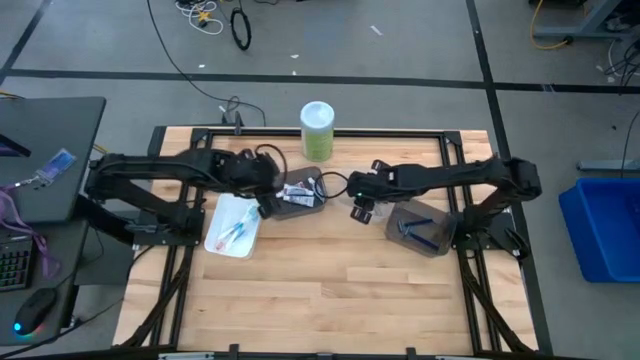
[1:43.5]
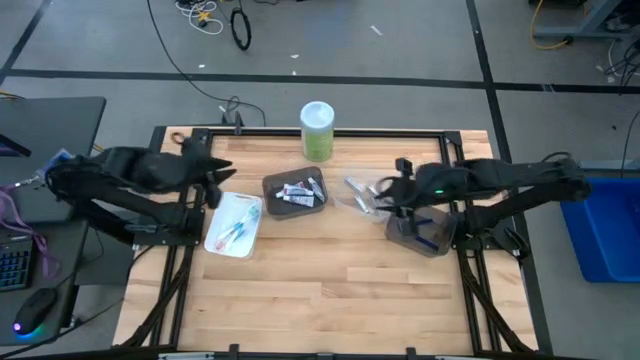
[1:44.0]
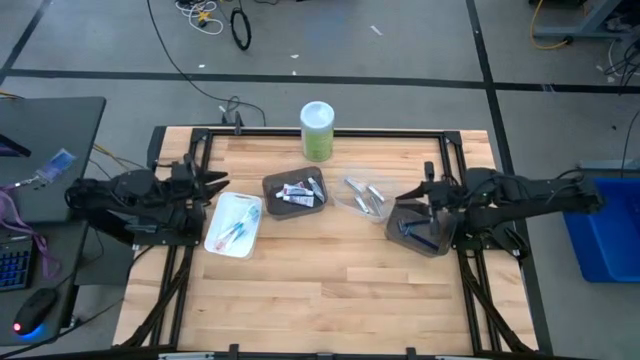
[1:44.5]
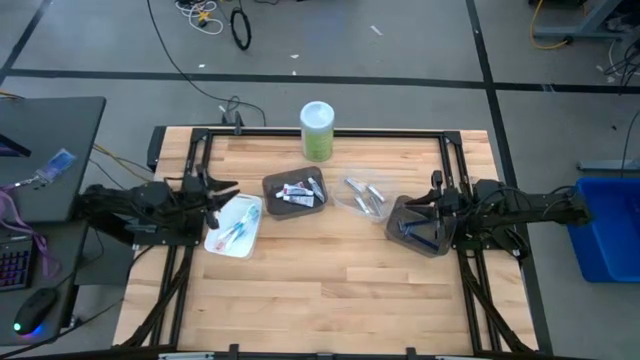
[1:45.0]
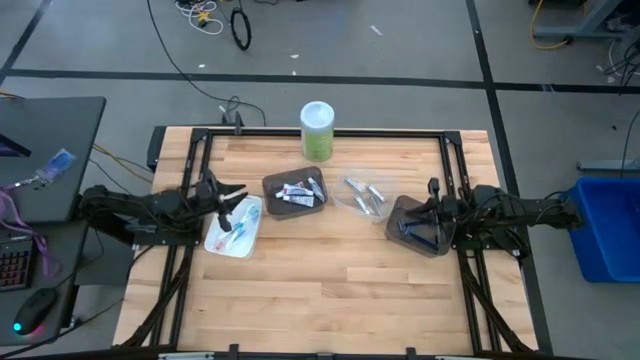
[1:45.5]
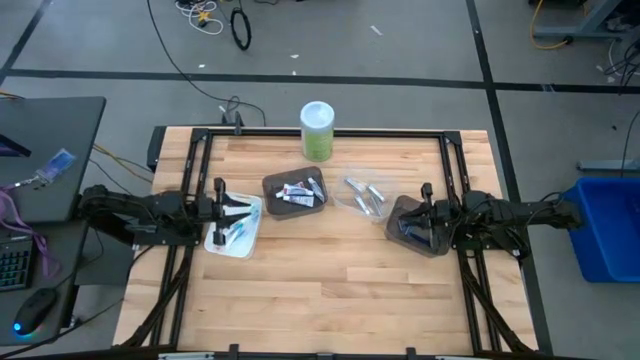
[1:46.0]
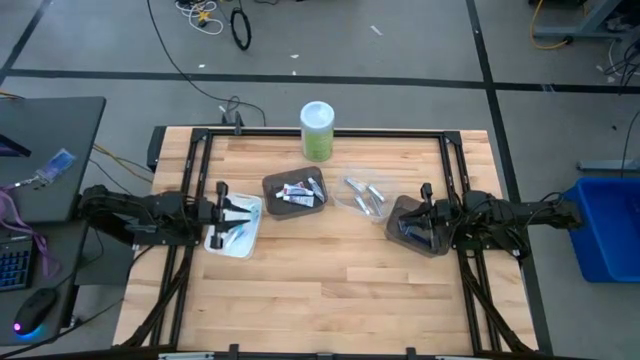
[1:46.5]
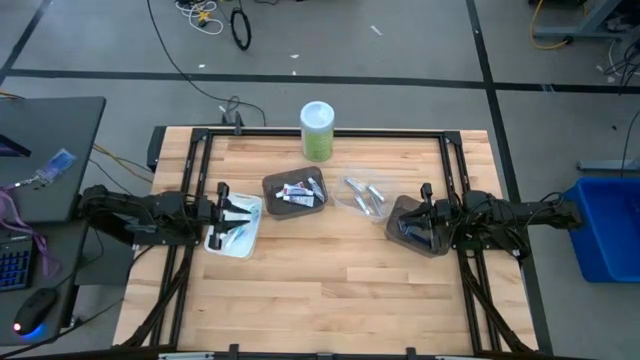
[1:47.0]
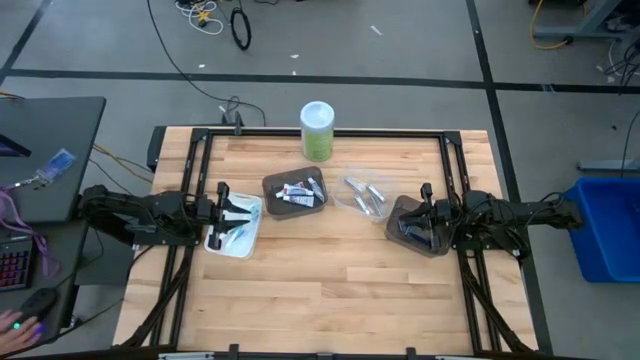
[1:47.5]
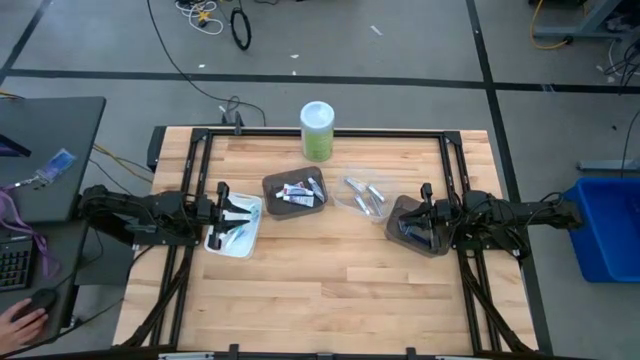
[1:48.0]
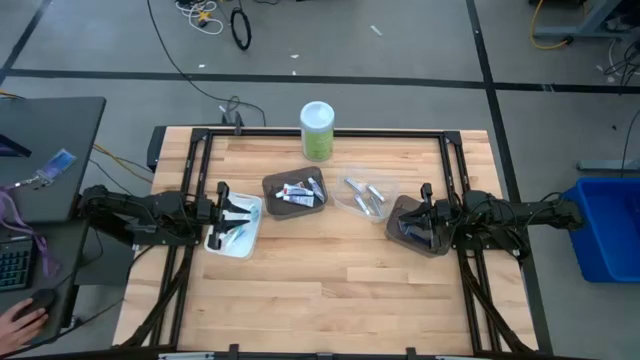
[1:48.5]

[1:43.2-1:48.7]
Task: Pick & Place Travel size toiletries
Return to Home Position

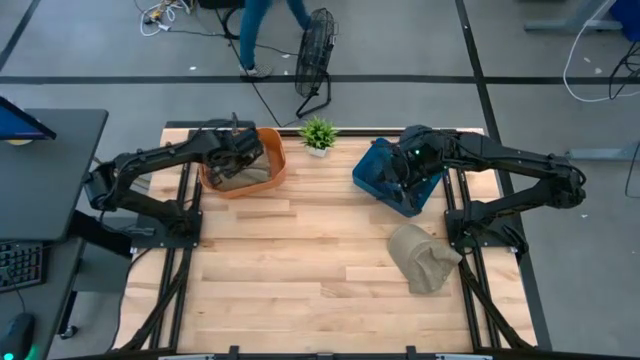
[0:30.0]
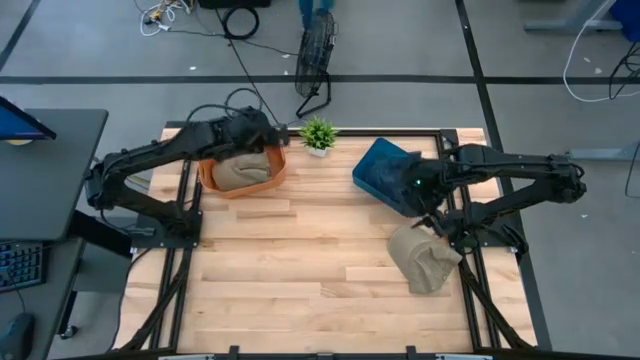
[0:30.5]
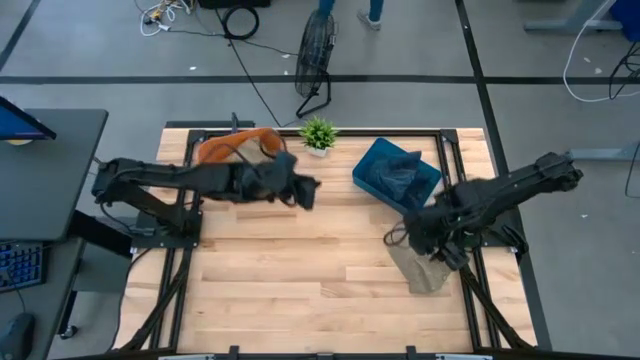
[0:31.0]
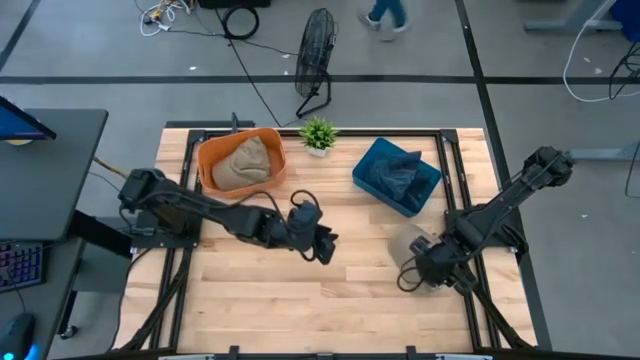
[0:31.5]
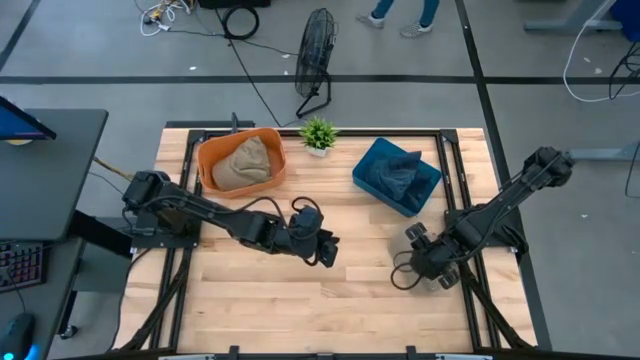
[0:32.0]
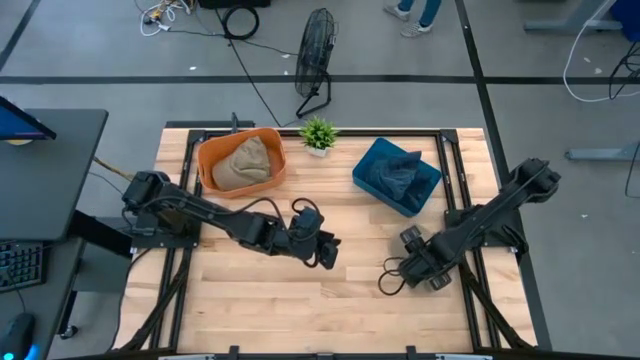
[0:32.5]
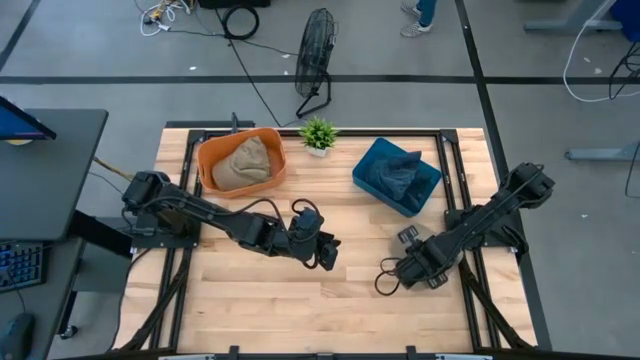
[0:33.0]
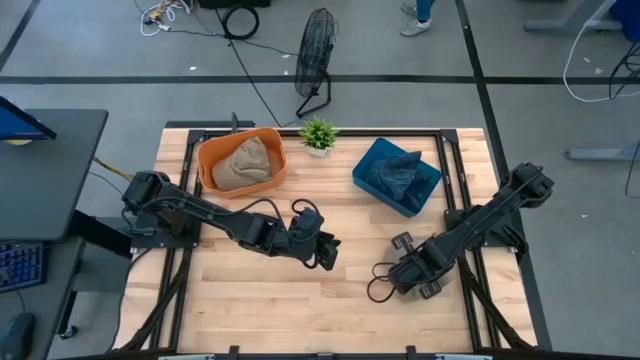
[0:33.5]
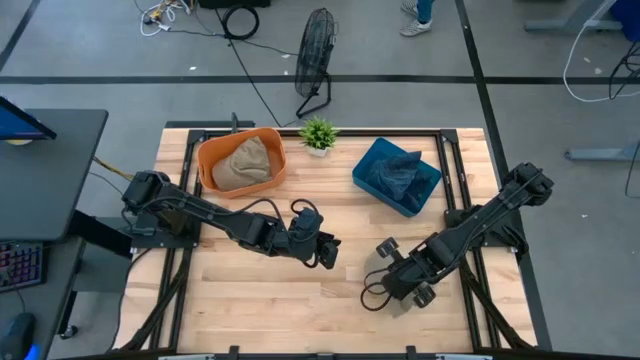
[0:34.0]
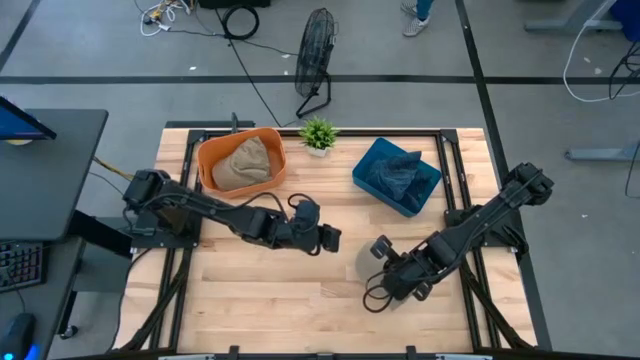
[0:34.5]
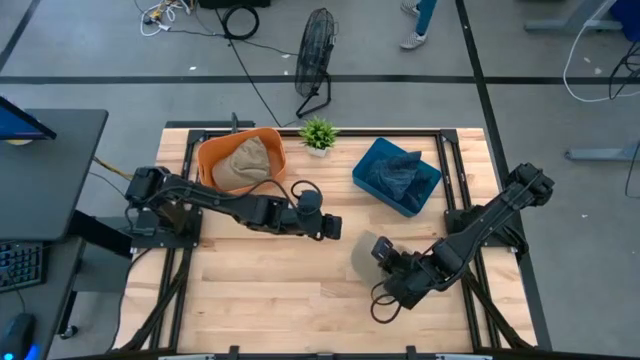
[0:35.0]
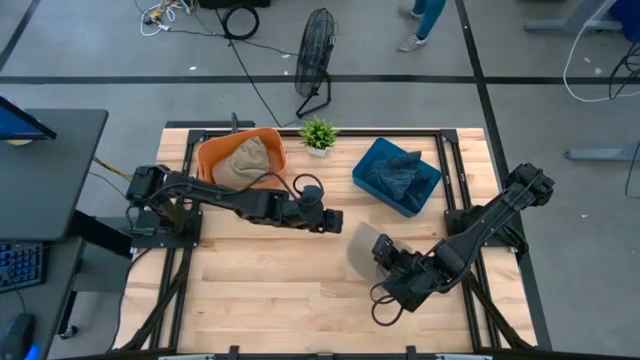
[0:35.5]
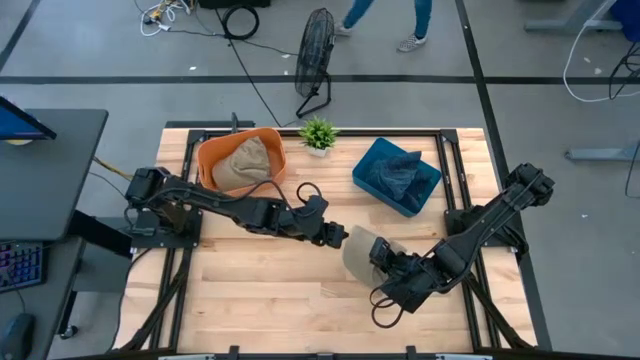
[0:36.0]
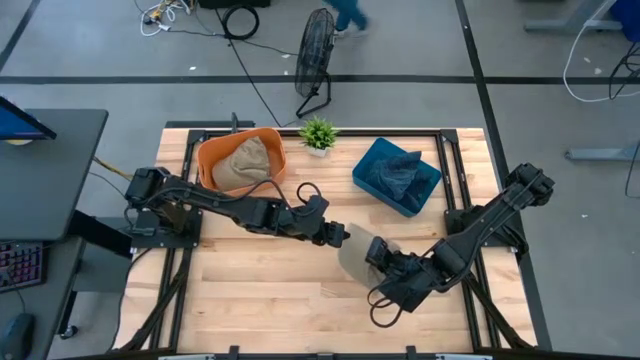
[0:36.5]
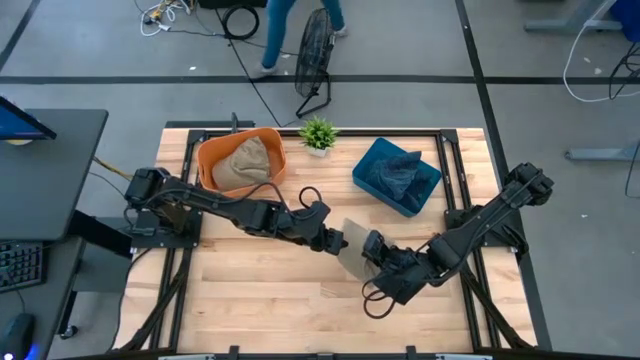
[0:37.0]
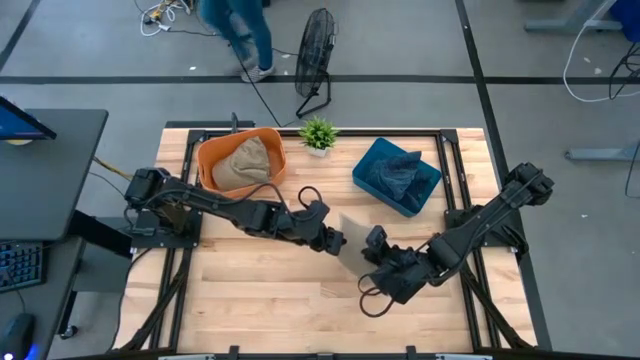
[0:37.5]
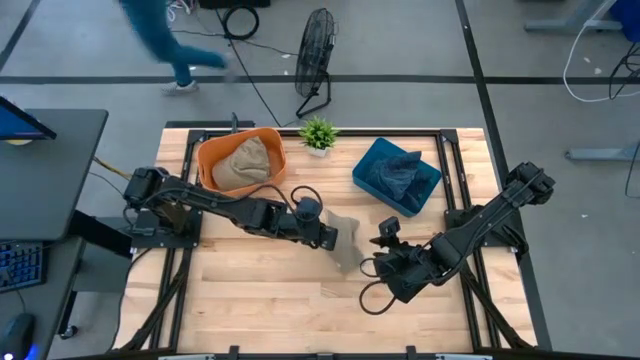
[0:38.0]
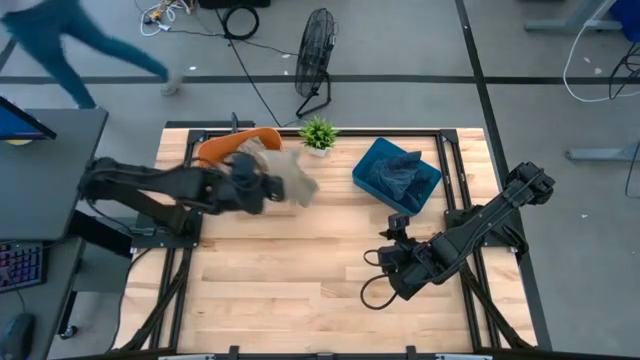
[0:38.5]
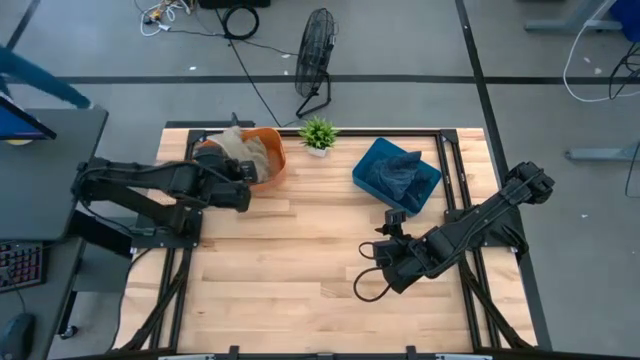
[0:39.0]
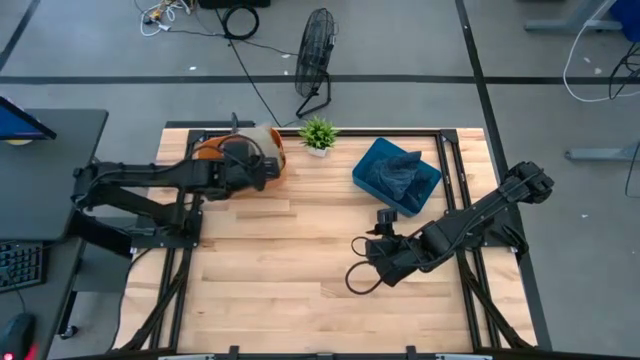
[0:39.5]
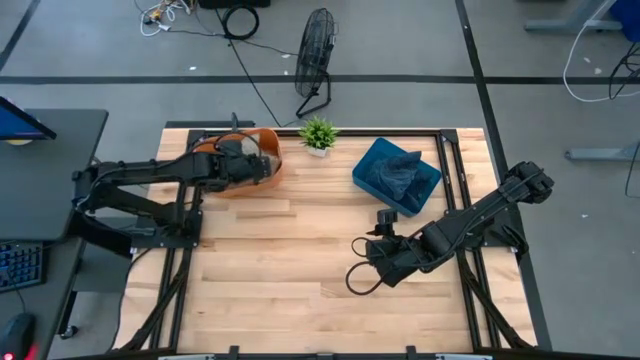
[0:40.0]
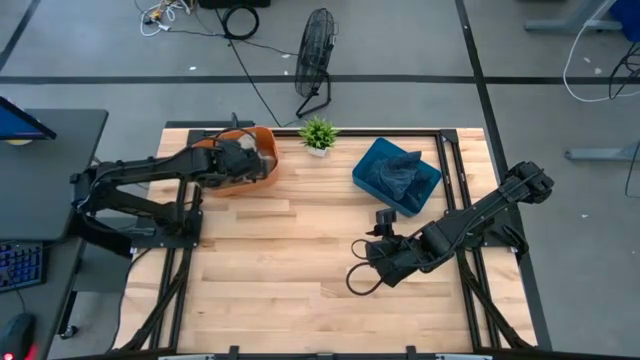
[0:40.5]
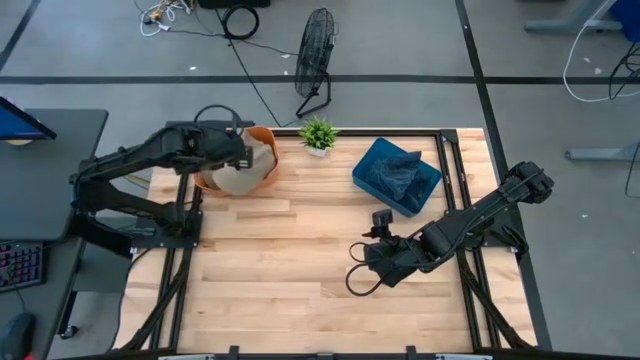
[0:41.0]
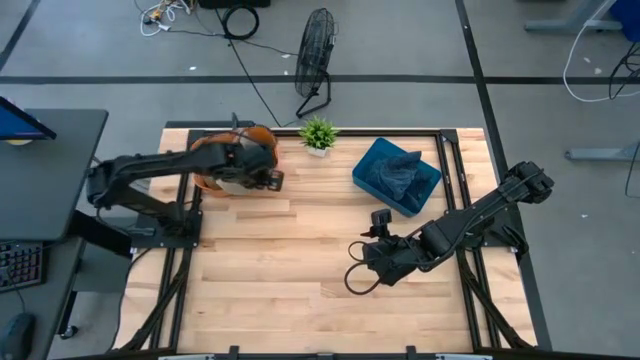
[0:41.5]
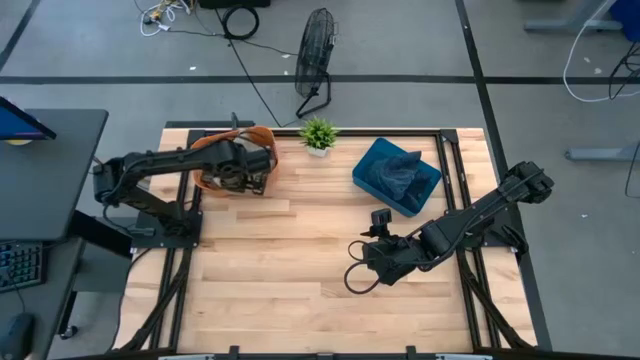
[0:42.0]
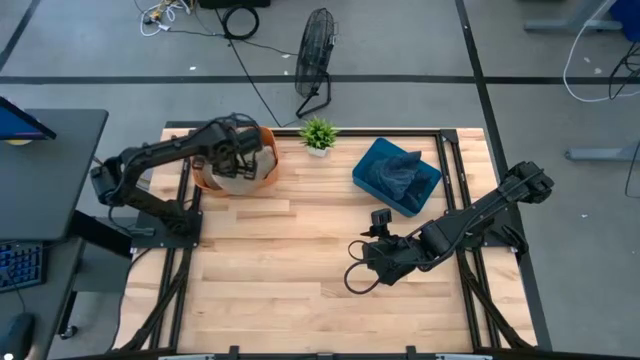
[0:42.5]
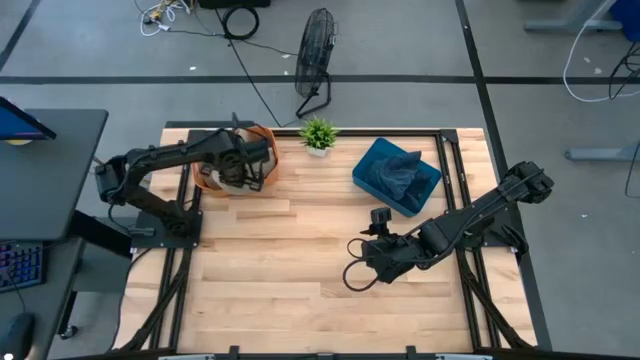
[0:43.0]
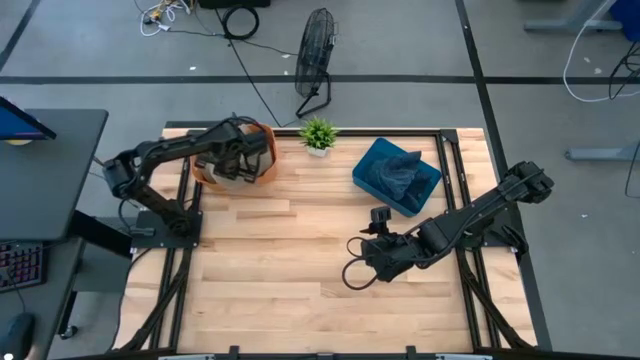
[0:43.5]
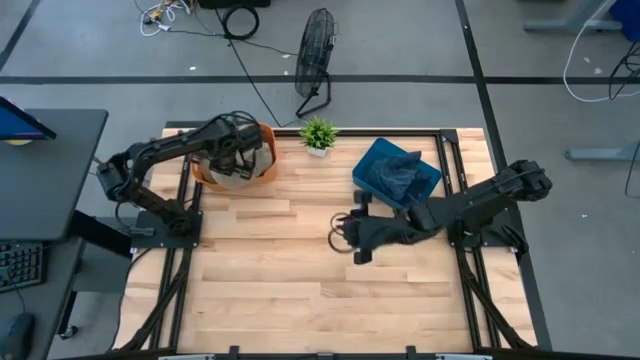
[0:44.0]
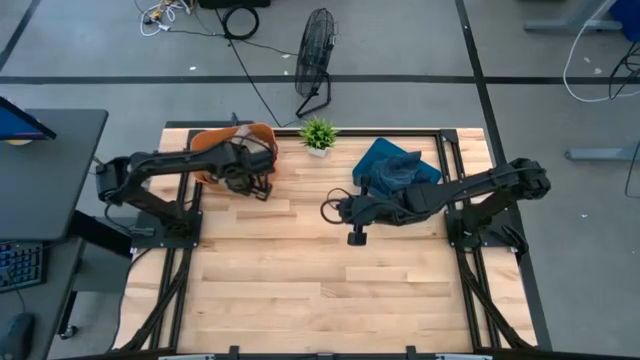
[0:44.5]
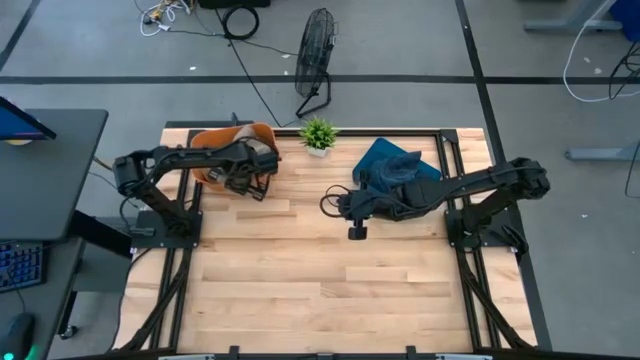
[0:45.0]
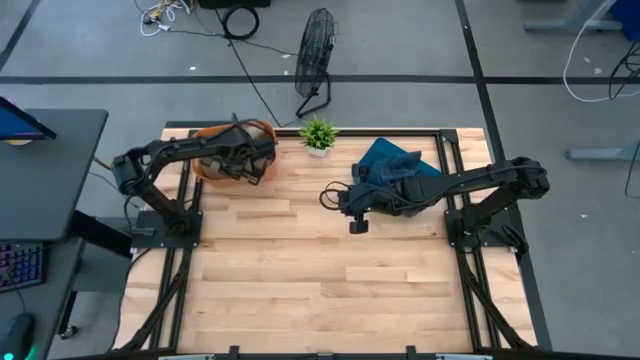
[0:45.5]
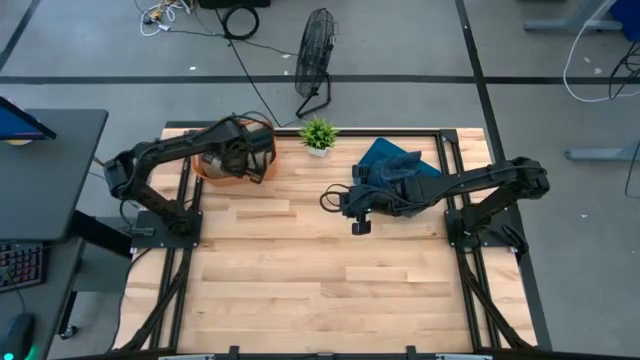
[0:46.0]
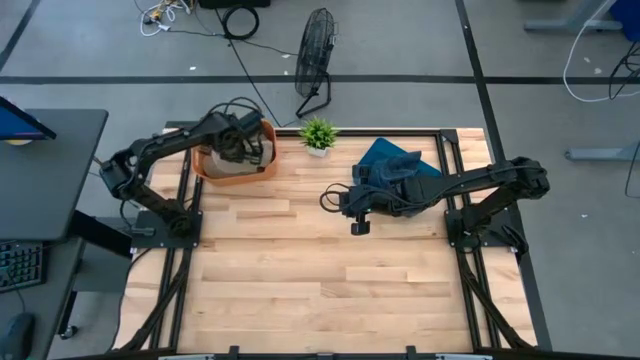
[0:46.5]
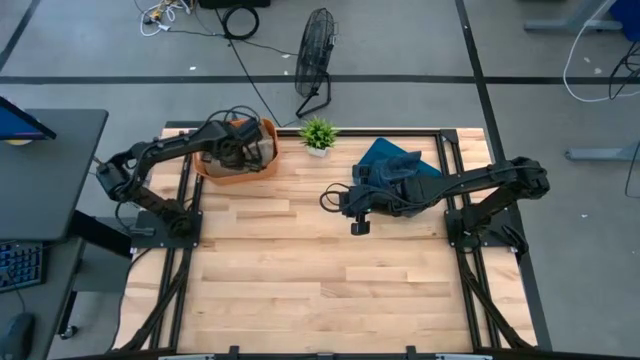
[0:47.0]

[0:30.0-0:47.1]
Task: Pick & Place hat
Put the brown cap into the orange bin
